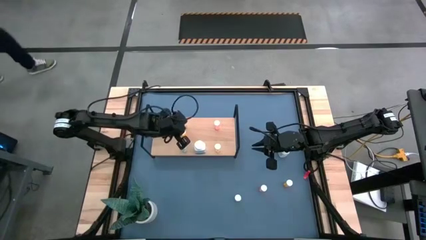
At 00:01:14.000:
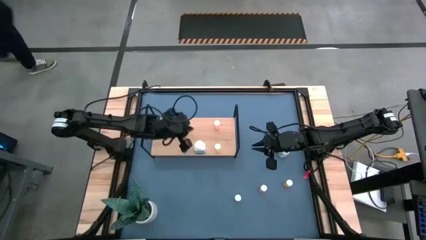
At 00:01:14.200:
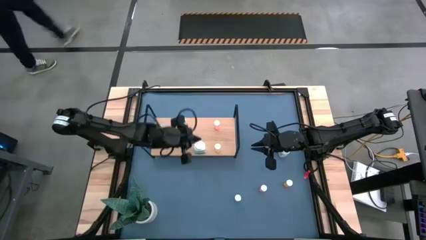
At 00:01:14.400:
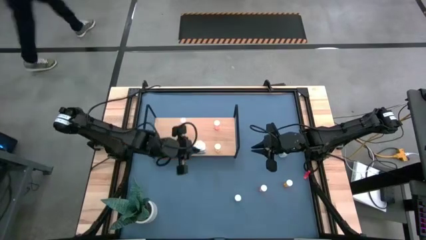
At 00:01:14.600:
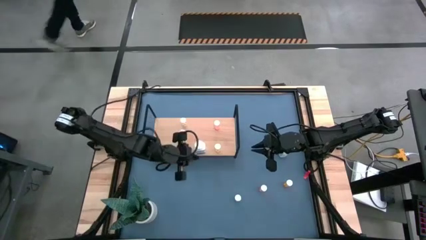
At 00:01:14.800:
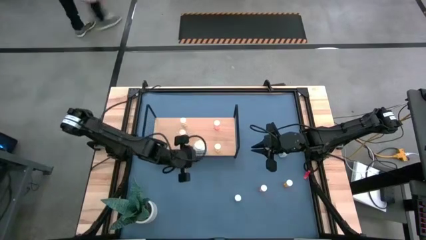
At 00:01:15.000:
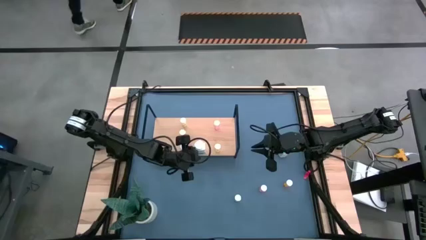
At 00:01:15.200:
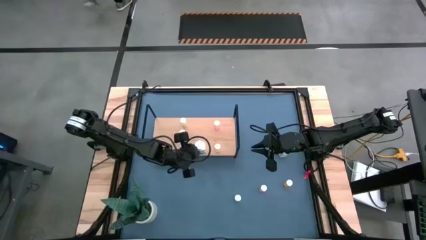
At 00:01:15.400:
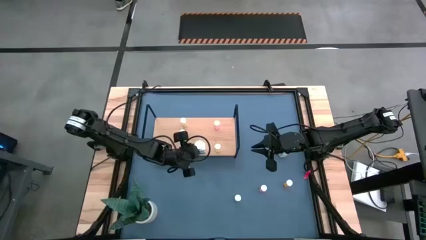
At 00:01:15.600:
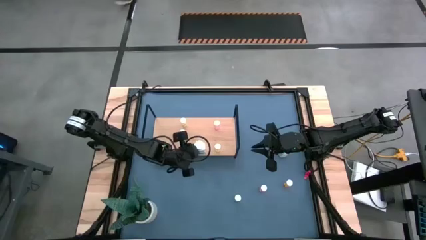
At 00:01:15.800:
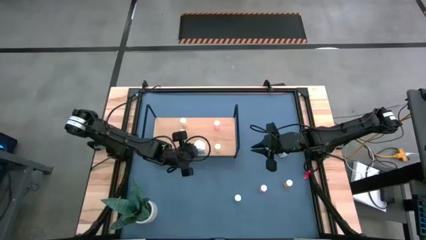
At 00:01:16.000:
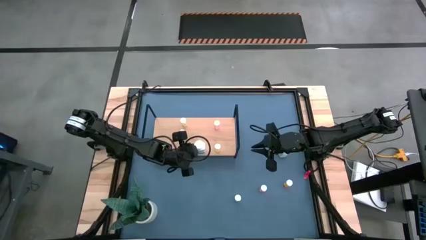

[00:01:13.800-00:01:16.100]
Task: Pick and place medicine bottles onto shelf by color
Adjust the white pill bottle on the shelf

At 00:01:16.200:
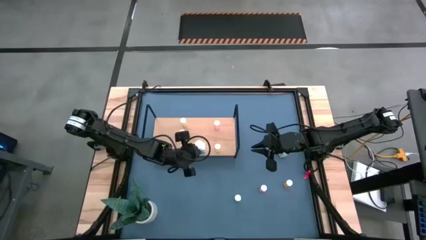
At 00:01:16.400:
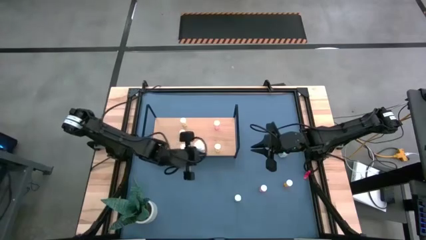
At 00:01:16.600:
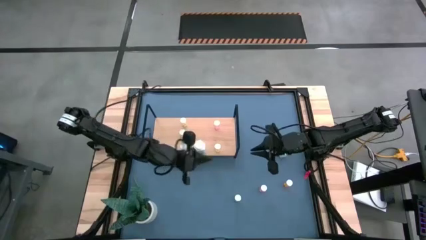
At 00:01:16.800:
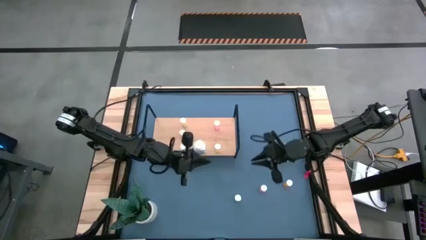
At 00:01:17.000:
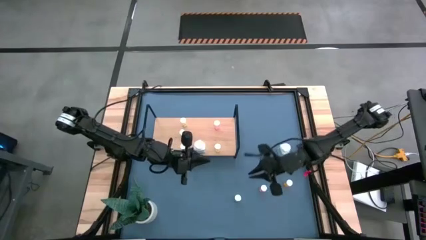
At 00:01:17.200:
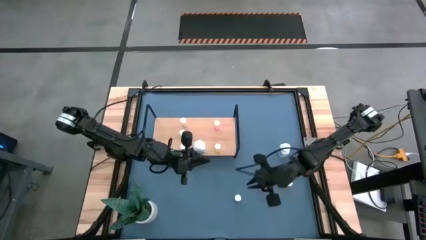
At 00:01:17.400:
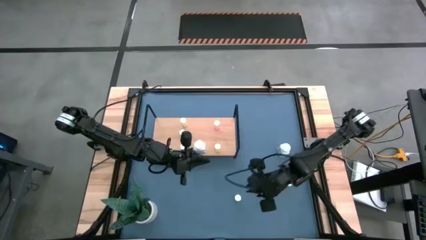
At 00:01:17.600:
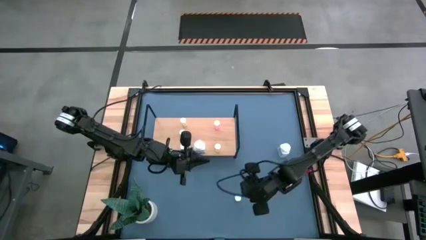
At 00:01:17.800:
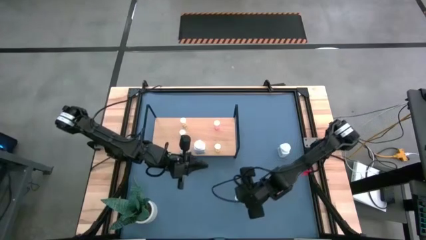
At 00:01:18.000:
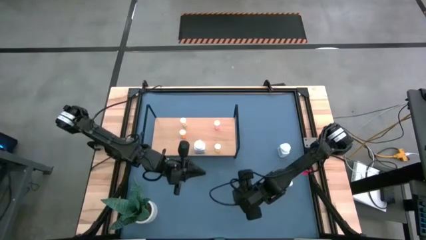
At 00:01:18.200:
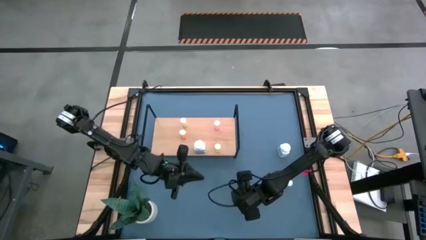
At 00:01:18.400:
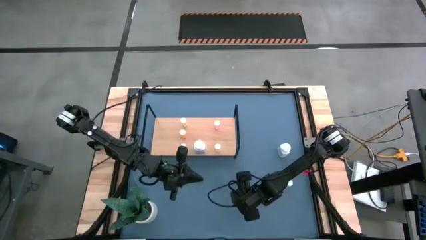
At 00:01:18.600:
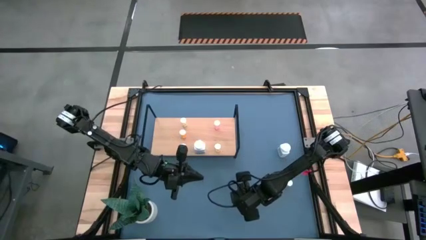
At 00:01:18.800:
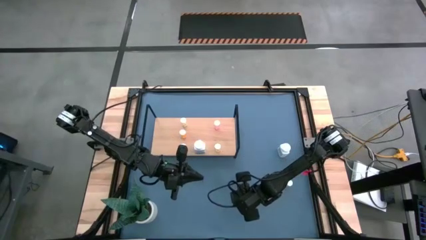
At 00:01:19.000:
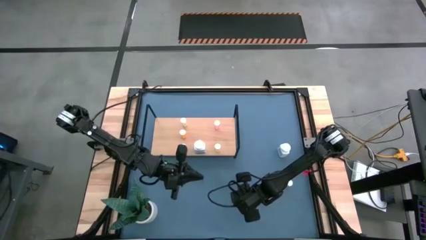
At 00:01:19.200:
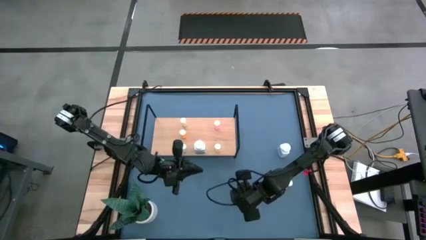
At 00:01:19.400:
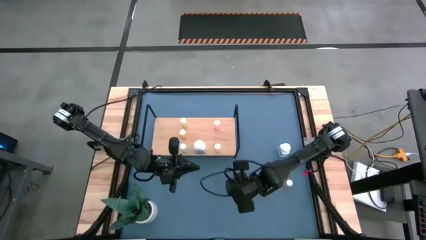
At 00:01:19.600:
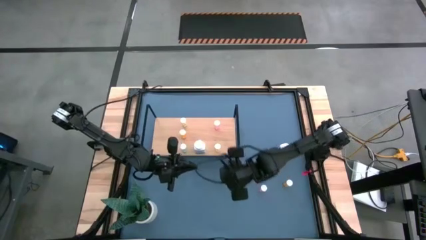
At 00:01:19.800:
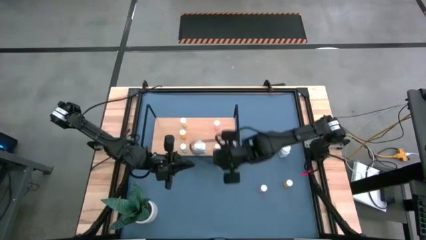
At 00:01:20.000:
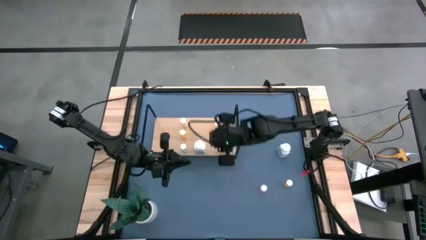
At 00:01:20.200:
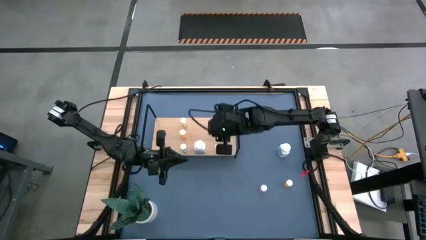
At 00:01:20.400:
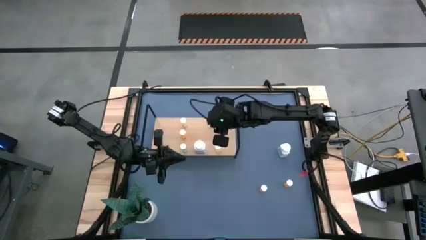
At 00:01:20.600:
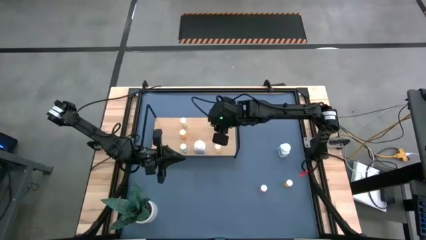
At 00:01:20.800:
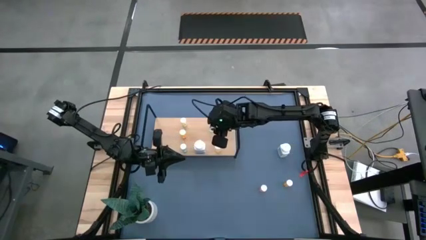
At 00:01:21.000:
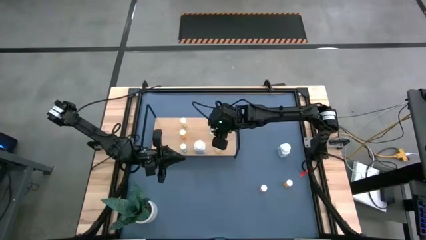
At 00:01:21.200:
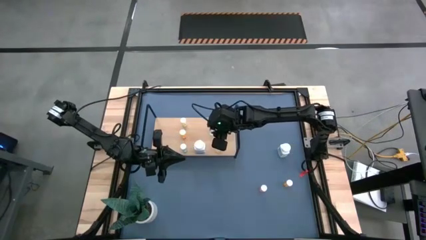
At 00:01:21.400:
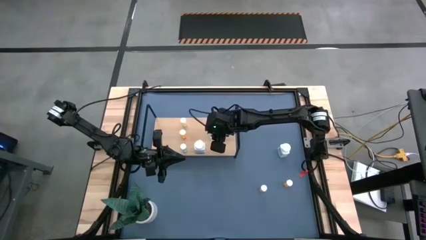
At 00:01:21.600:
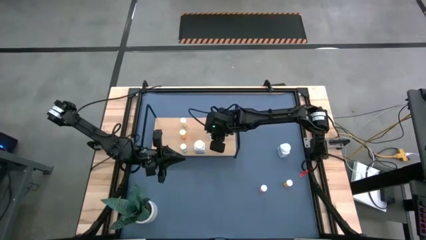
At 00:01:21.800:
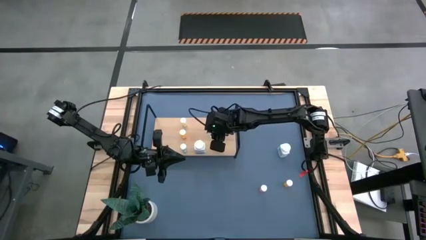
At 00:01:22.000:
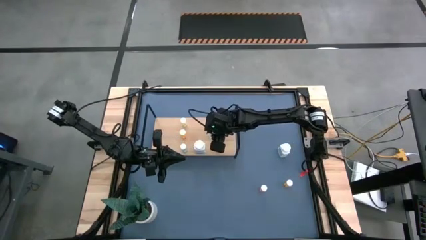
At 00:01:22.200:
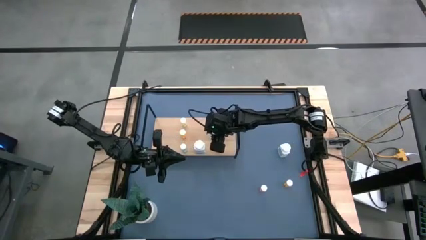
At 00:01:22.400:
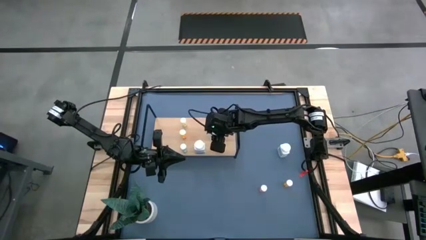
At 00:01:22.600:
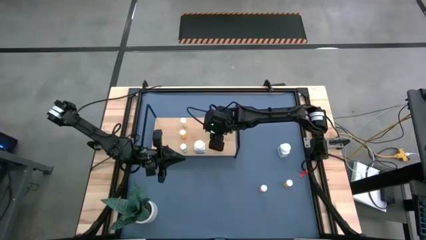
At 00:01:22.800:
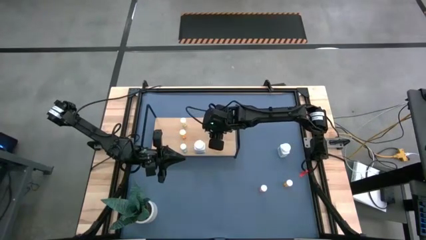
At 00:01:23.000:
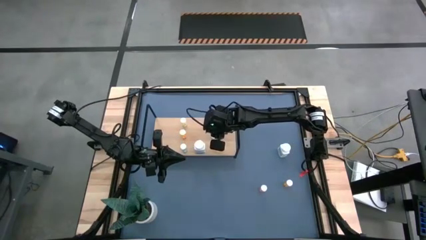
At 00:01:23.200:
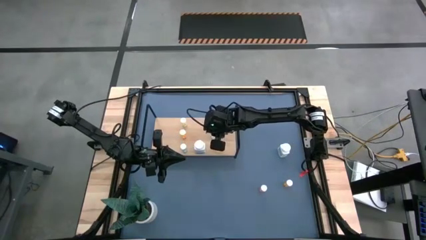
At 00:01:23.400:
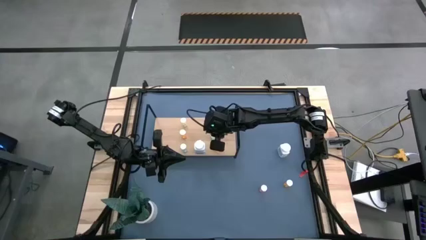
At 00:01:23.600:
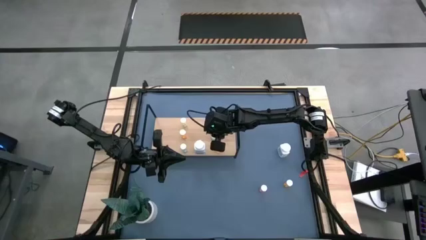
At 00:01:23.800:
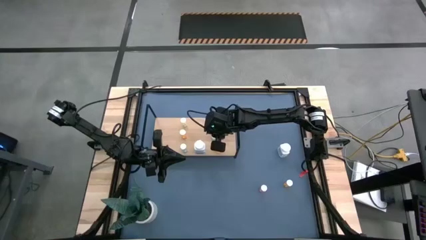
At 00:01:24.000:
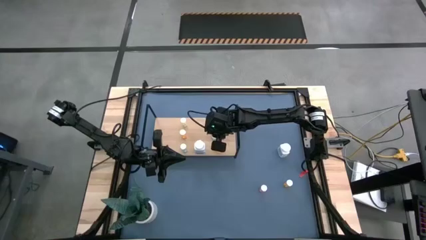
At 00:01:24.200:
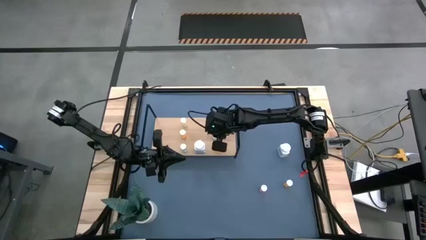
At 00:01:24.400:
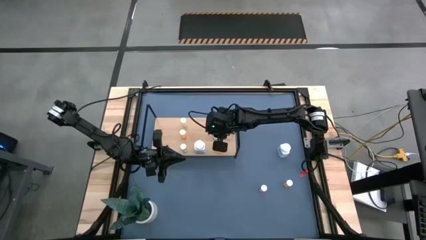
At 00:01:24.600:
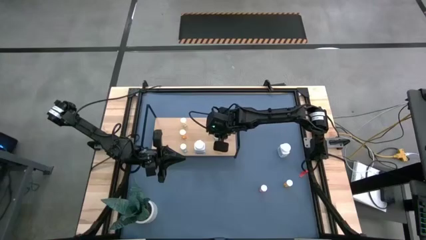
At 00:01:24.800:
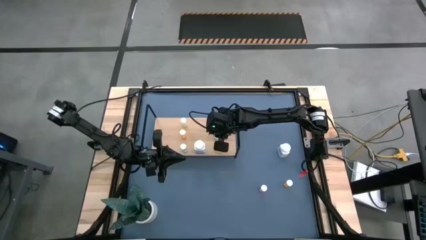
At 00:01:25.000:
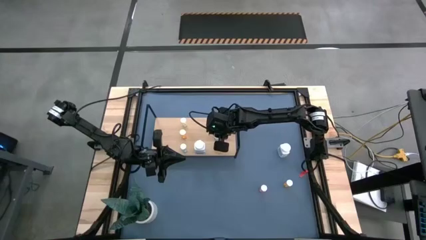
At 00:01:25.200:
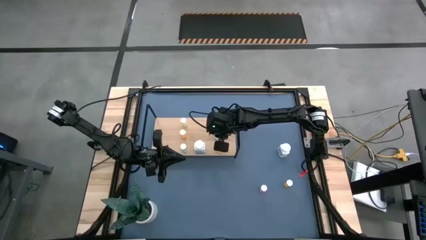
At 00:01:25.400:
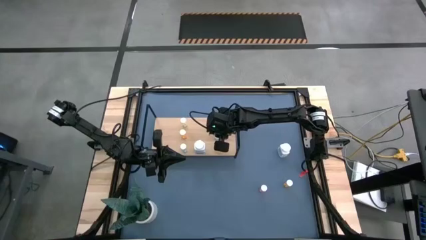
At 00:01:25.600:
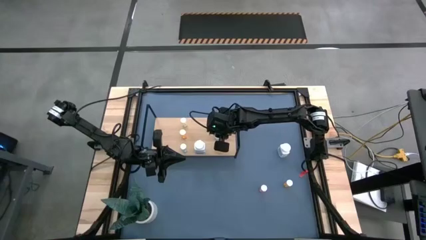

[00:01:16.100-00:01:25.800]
Put the green pill bottle on the shelf

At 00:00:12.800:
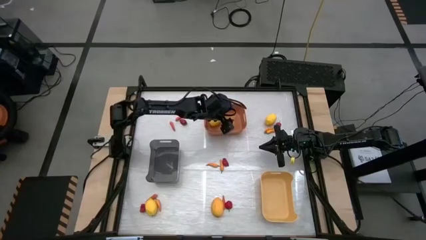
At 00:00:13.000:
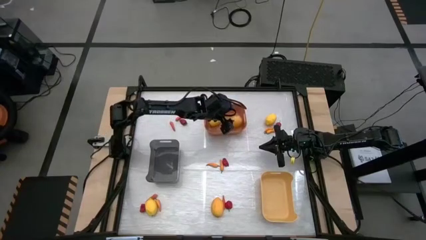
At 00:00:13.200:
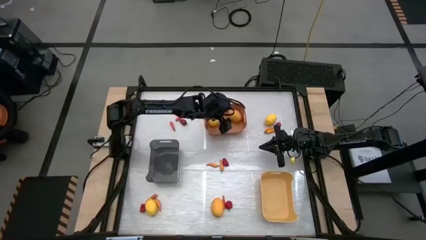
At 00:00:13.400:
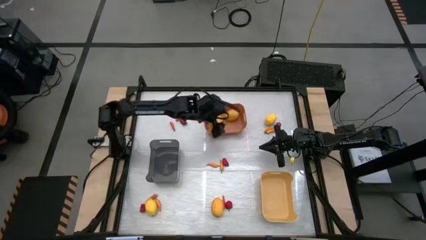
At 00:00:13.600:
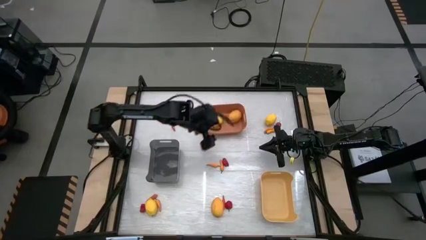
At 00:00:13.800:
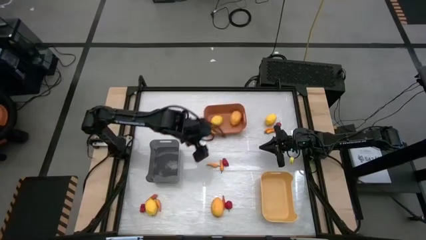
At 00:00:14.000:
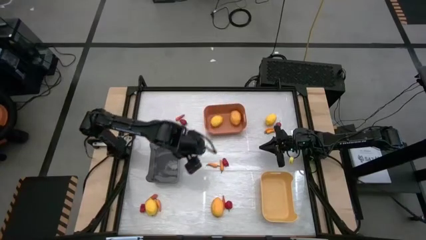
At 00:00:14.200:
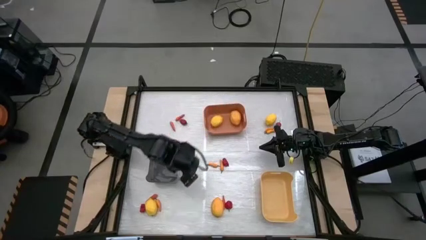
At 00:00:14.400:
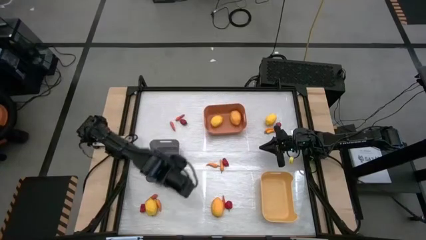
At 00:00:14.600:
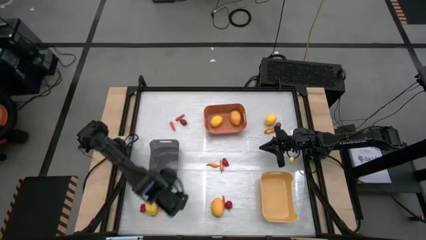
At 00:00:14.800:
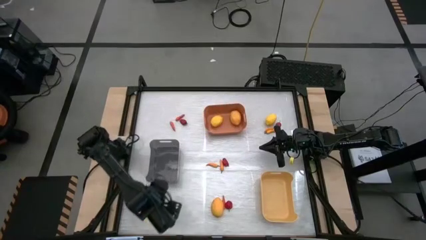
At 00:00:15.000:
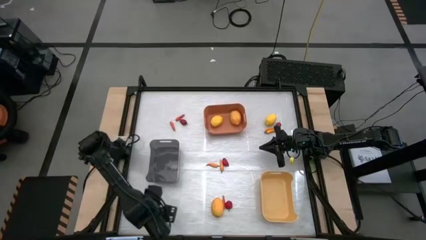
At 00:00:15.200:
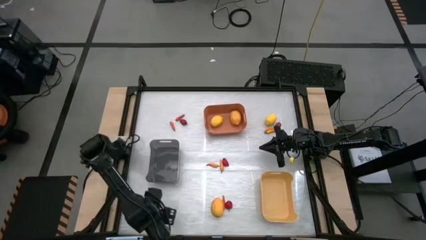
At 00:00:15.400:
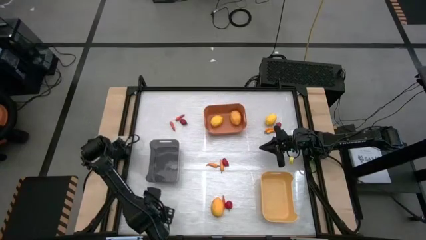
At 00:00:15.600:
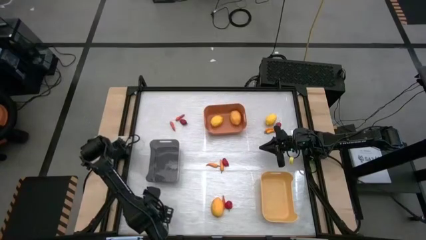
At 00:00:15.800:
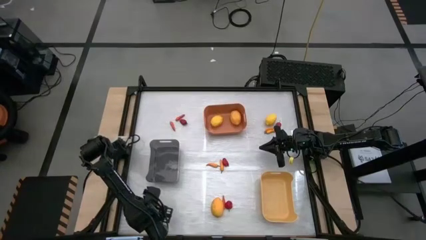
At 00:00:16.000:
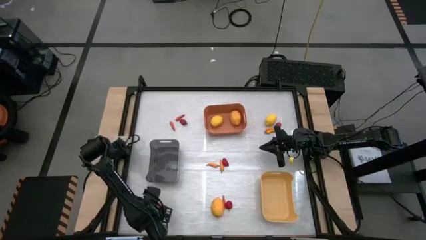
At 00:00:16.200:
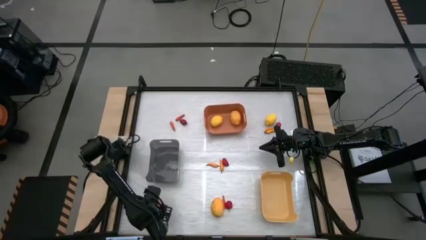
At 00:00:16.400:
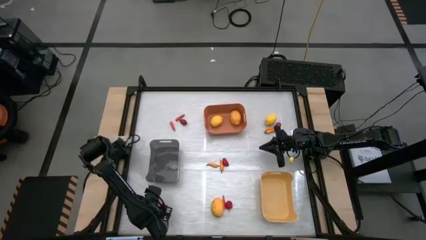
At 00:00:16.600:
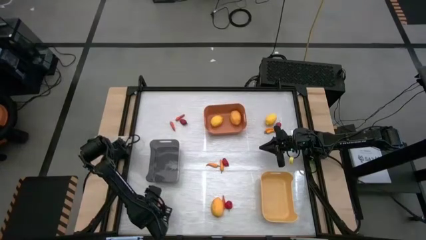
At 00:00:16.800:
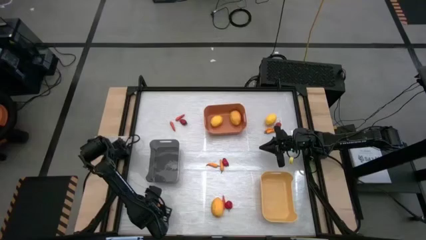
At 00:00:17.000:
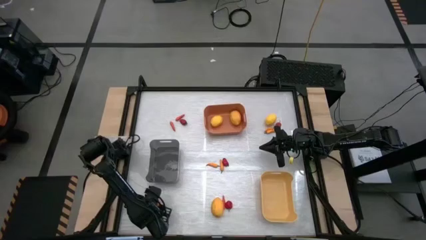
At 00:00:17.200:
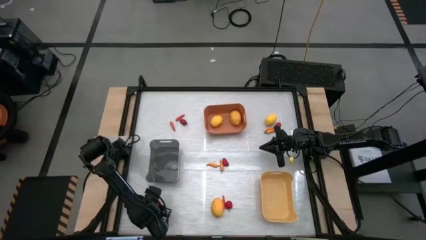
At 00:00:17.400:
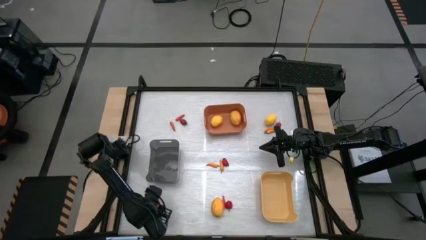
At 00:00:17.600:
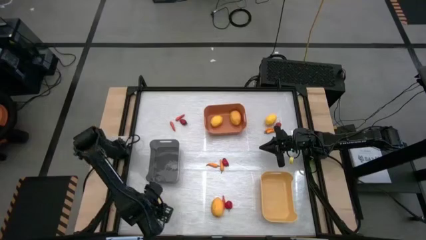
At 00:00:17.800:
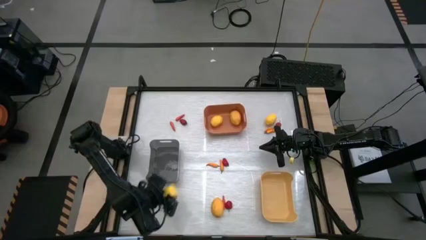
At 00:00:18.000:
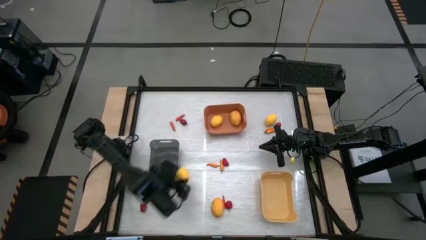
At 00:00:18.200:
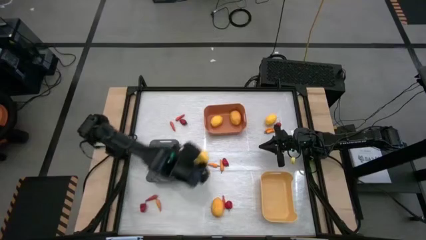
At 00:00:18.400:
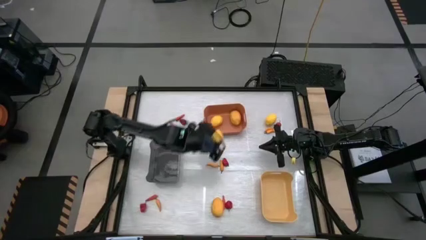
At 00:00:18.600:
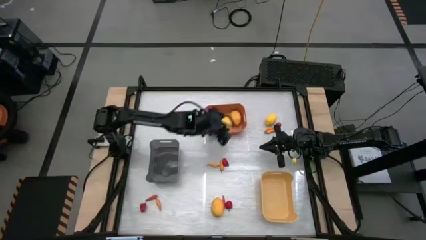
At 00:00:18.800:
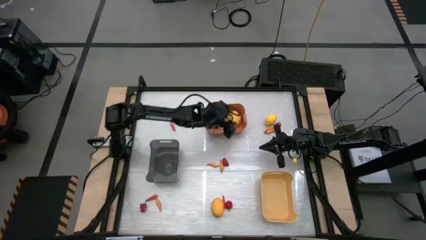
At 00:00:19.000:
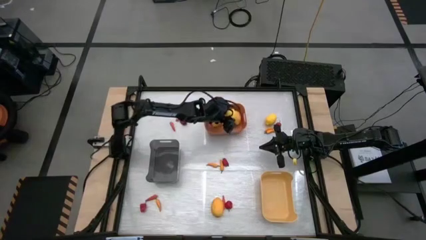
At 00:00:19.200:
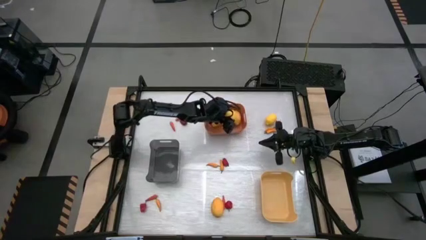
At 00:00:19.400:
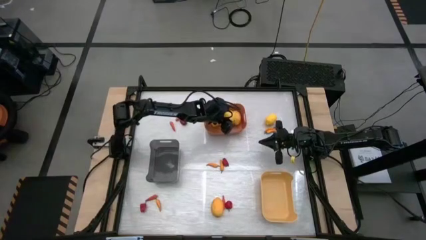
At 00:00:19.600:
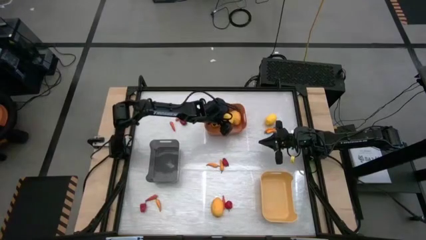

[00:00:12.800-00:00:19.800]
Task: Sort produce into baskets
Put the lemon into the orange bin
